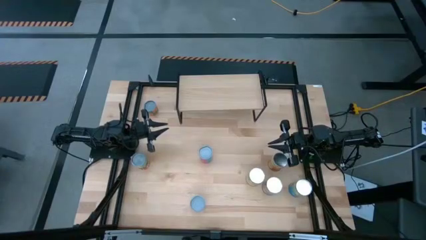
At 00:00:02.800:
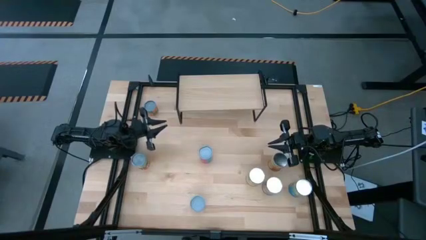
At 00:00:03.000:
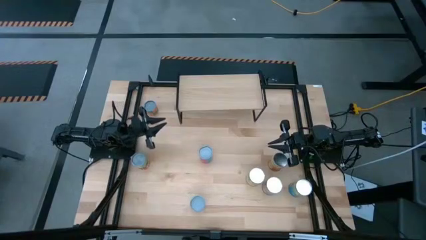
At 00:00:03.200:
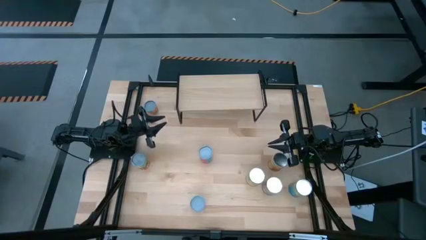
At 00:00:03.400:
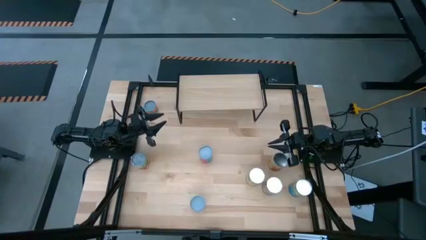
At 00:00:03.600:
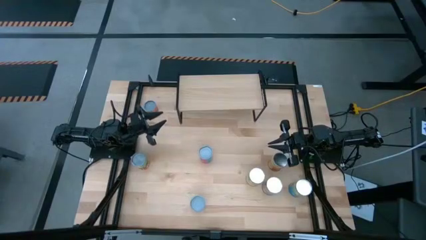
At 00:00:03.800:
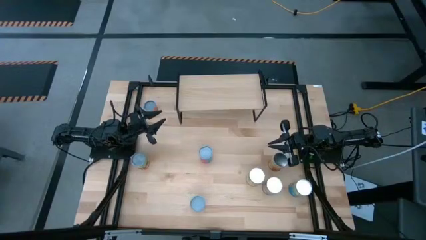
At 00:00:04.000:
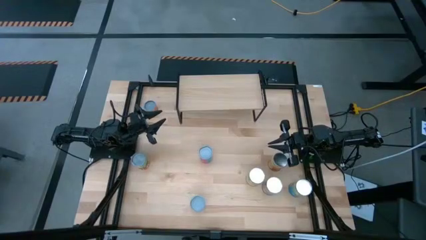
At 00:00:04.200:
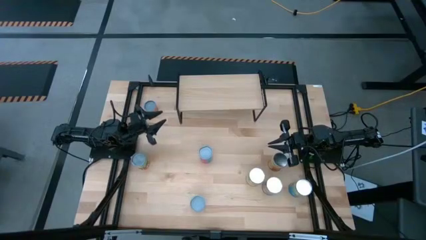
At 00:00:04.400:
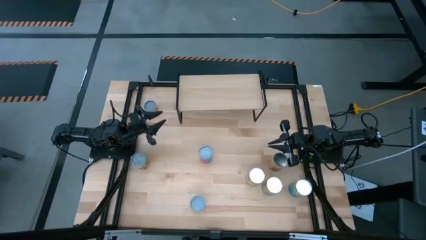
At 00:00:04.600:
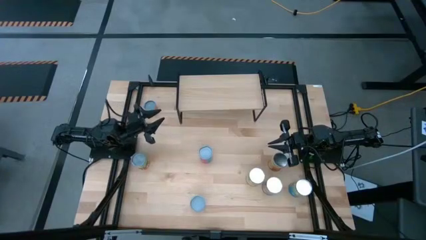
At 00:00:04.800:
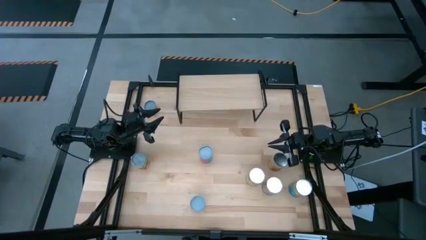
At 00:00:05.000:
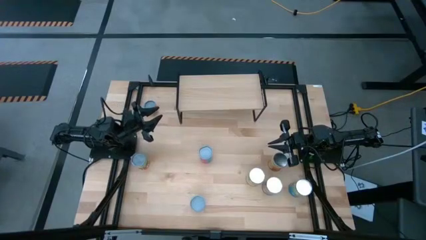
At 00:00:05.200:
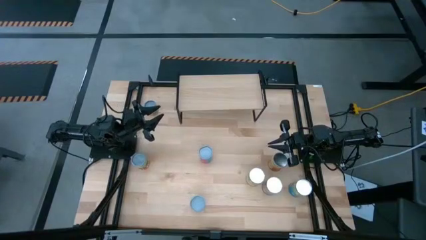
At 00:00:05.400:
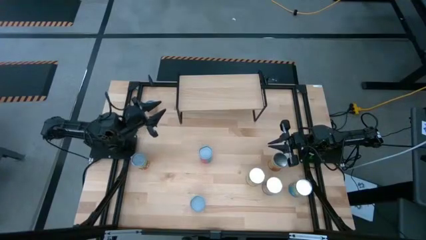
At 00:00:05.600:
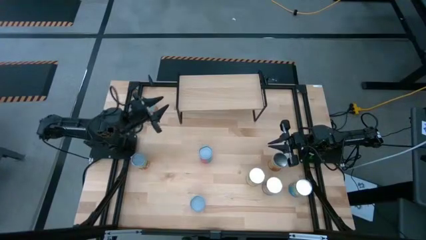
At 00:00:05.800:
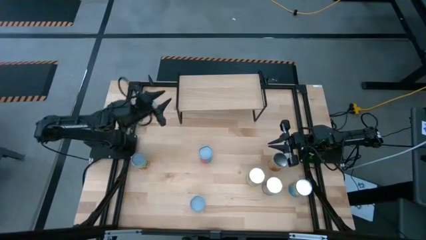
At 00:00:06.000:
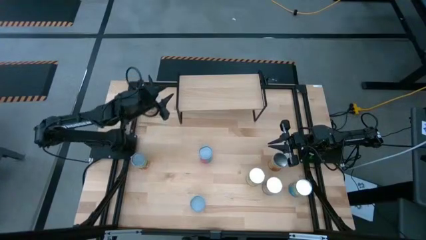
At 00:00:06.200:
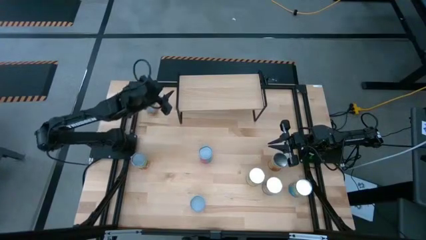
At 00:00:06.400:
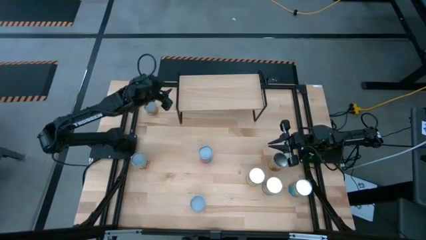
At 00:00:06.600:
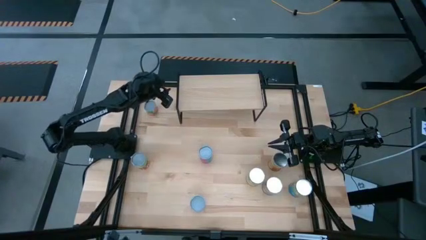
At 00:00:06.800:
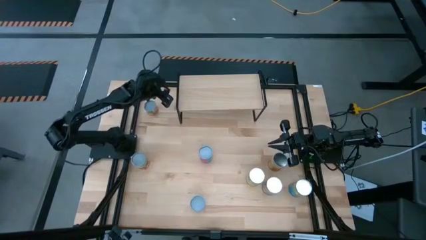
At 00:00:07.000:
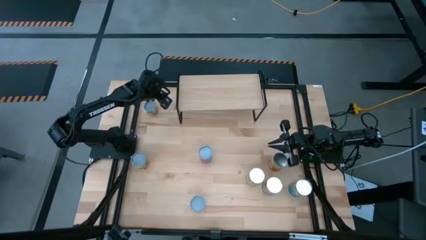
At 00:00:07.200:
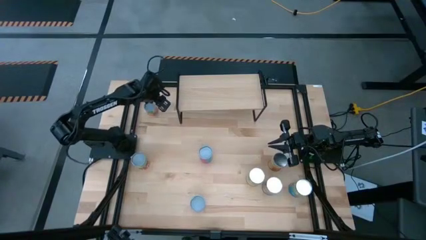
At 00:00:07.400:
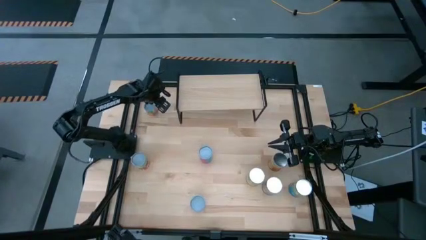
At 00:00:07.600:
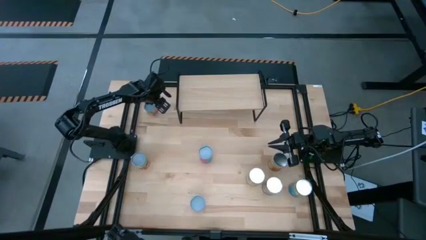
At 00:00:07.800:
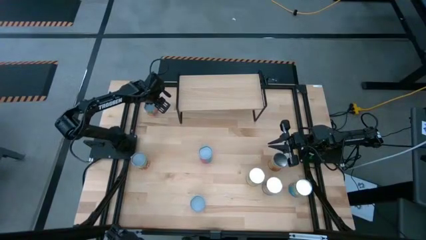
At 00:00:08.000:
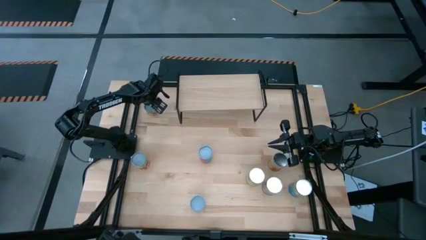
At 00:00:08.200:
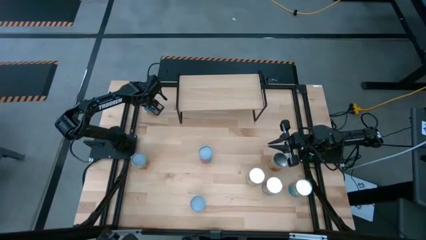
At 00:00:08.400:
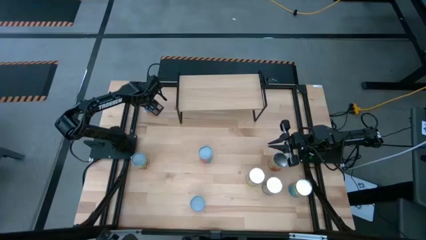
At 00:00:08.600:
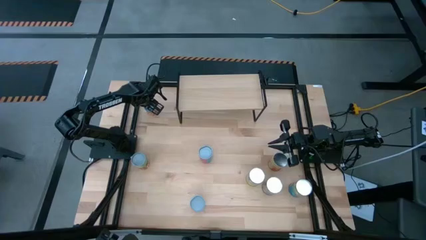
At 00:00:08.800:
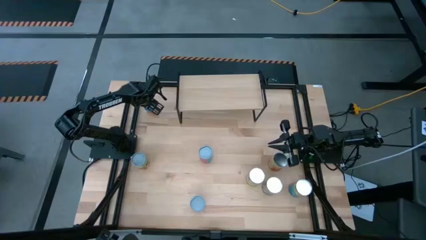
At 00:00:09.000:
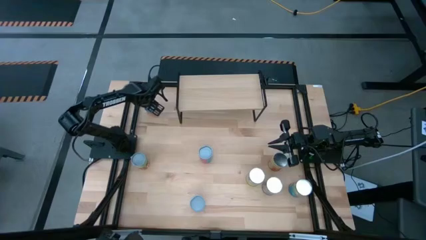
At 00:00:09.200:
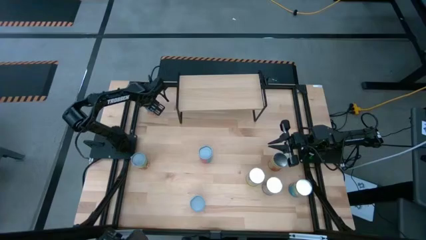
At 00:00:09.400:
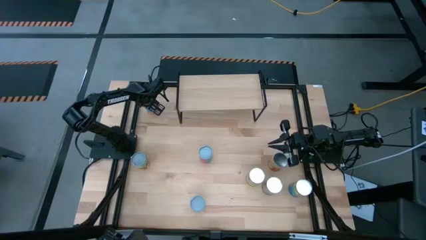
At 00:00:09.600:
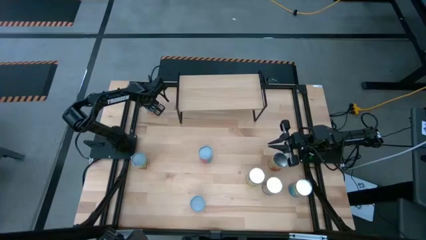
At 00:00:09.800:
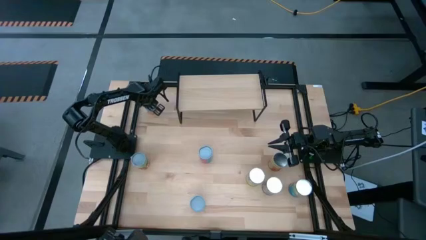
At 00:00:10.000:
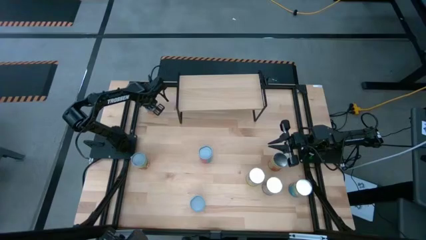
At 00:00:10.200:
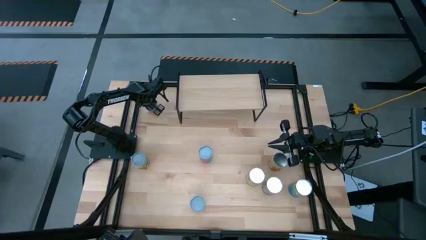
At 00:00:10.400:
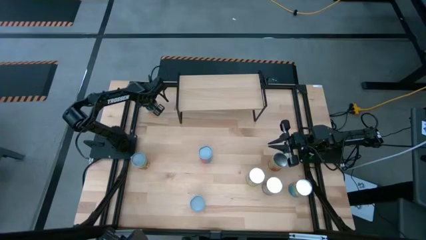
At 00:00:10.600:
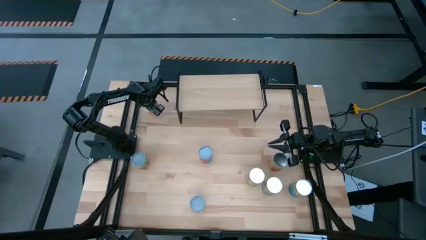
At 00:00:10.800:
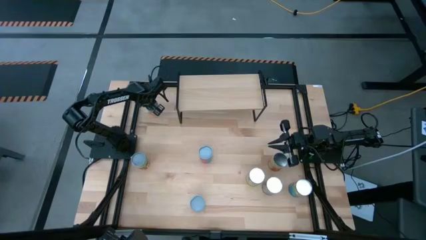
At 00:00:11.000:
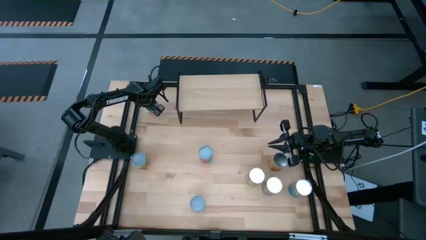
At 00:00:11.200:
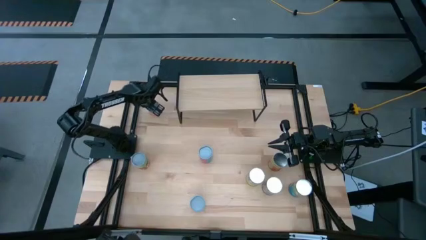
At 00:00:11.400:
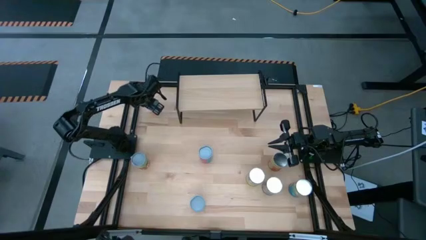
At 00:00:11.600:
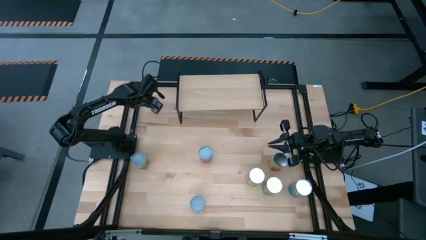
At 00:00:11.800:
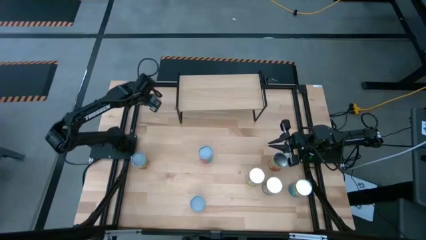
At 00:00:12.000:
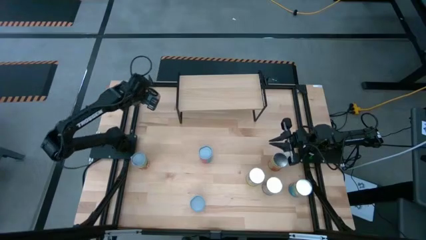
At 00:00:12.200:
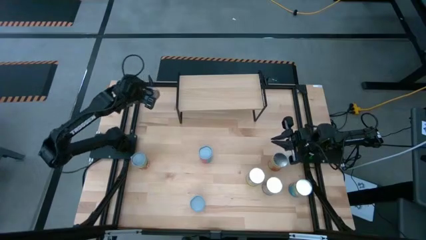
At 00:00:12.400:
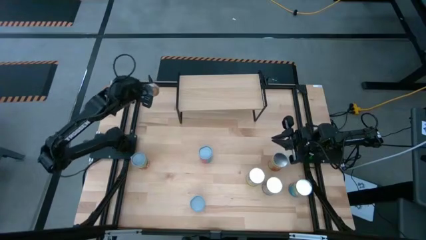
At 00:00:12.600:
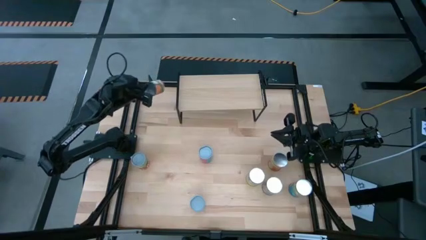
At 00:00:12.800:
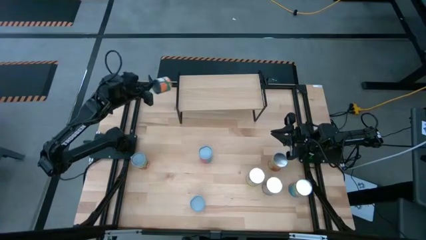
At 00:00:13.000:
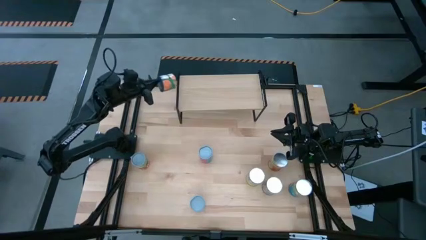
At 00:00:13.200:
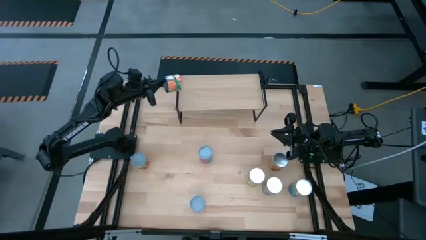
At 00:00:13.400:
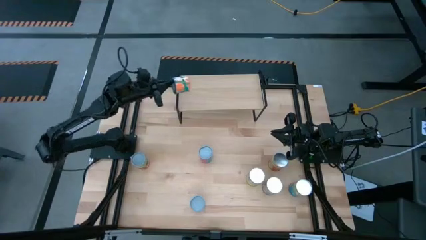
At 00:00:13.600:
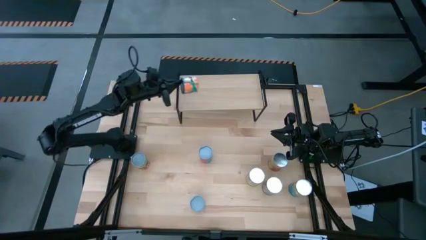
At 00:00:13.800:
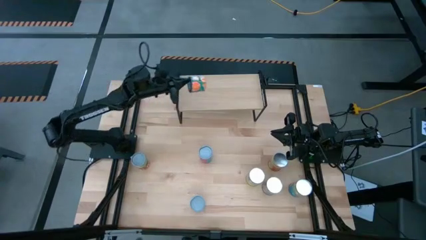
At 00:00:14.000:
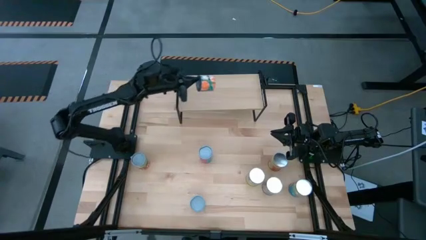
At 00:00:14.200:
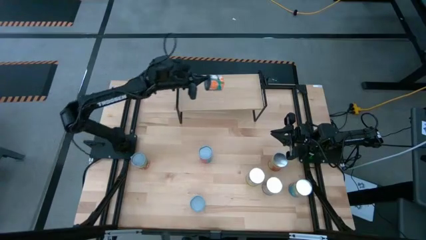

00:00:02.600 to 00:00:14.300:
Task: Pick and place cans onto a shelf
Put the canned oranges on the shelf
